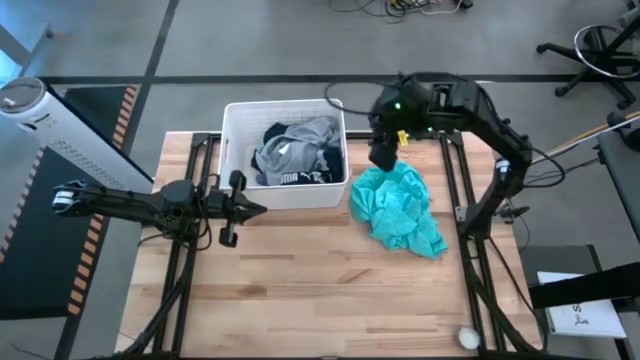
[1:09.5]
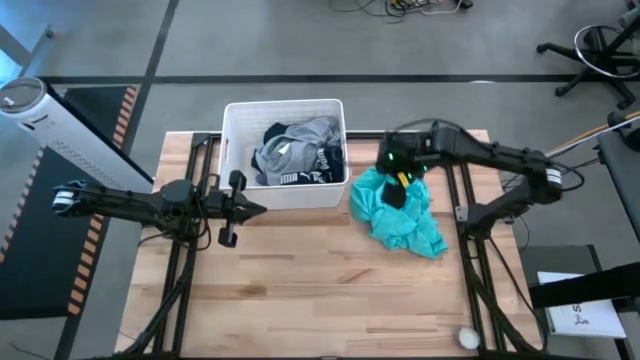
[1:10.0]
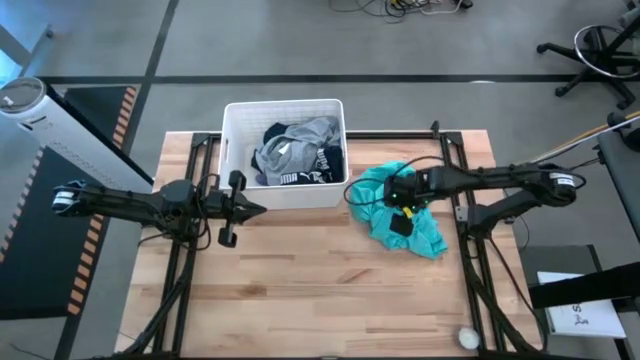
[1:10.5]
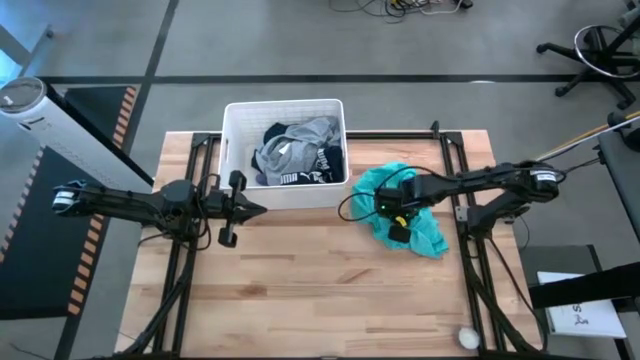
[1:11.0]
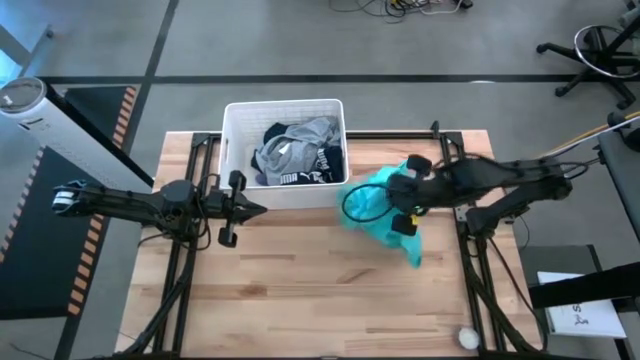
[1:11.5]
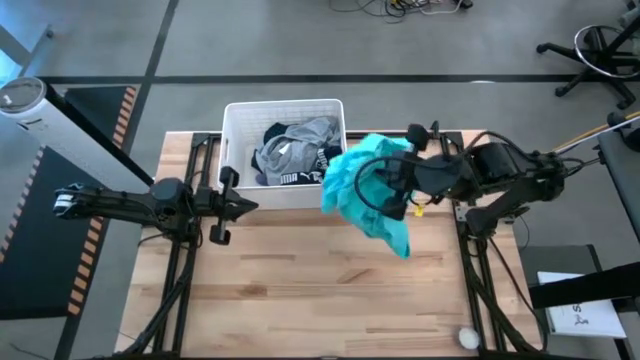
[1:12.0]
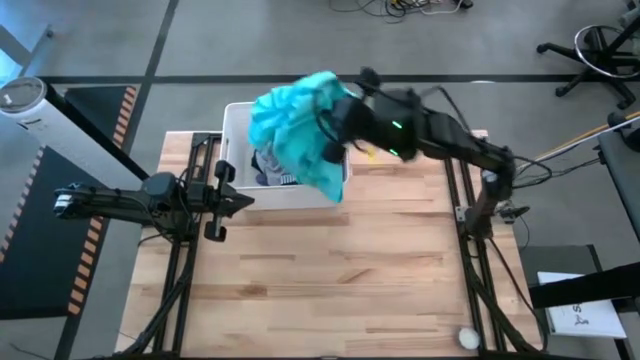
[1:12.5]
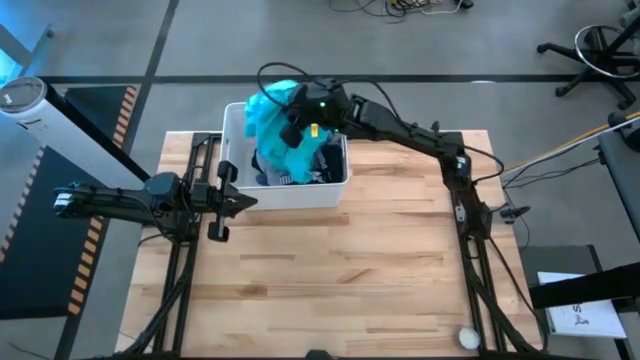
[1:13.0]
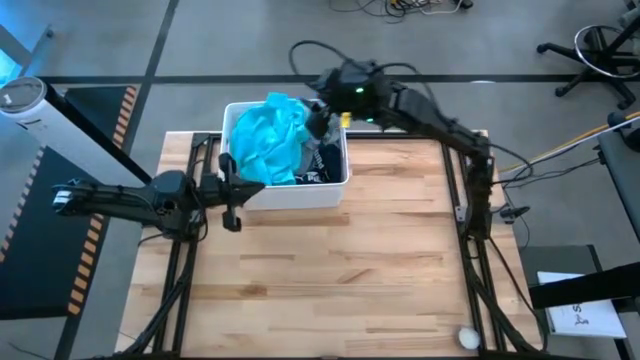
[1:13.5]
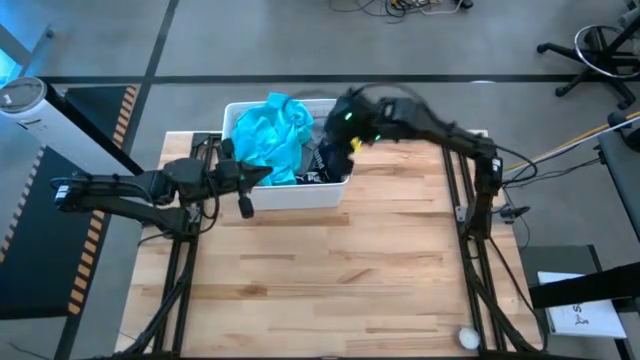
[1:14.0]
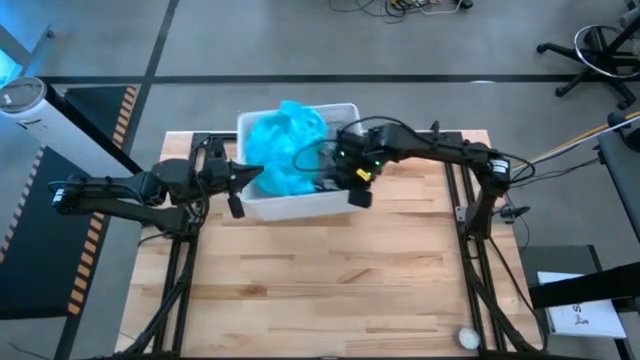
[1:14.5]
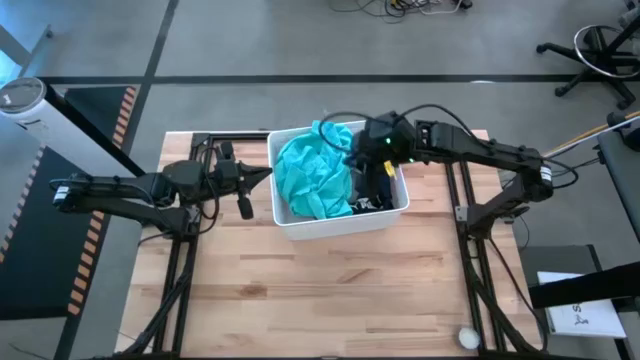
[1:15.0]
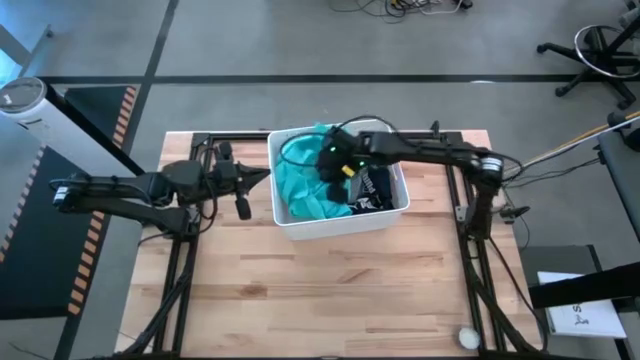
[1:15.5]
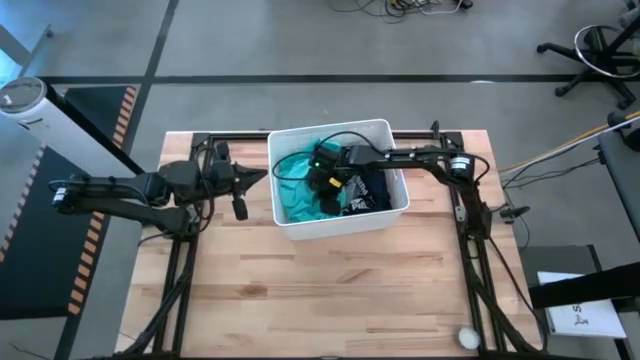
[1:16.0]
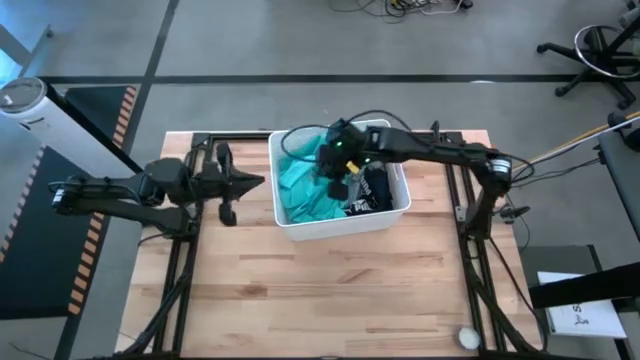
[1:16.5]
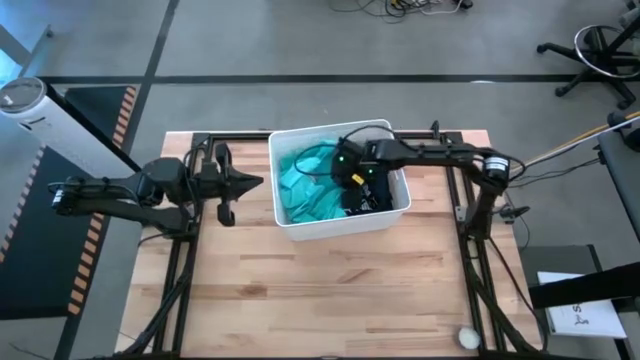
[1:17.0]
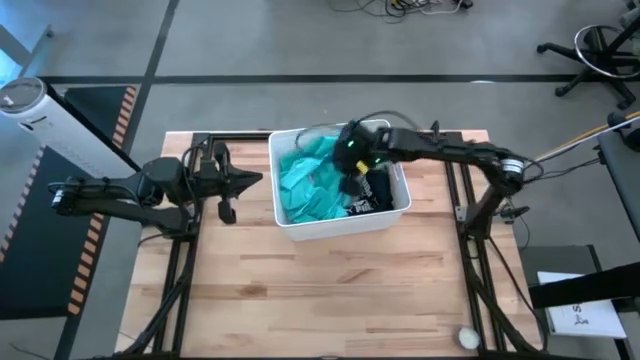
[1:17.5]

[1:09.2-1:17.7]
Task: Sort clothes
Put the light blue polo shirt into the white laundry bin

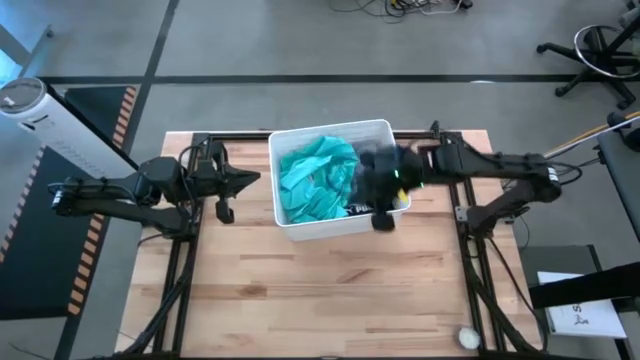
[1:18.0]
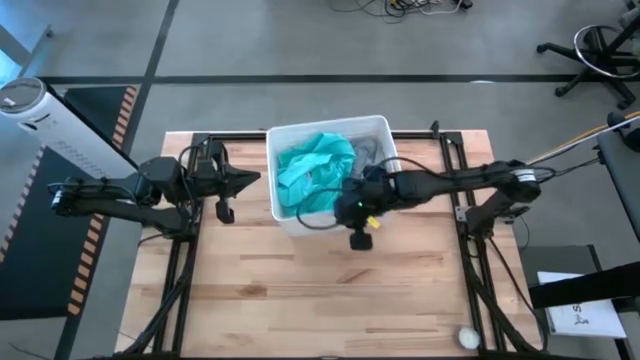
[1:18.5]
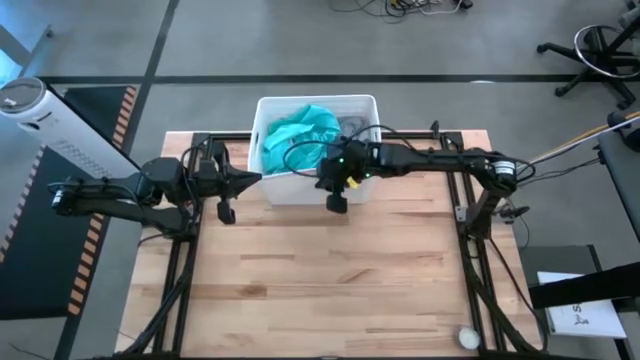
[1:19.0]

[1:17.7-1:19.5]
Adjust the white laundry bin to the top center of the table

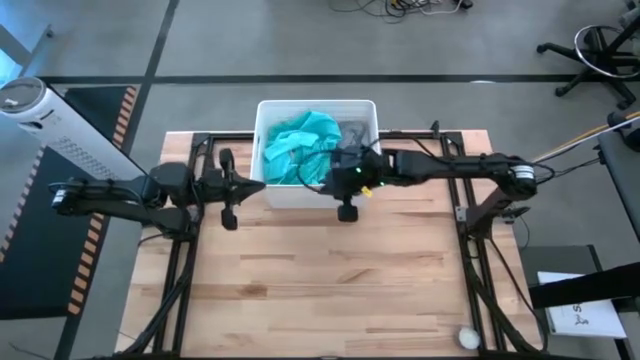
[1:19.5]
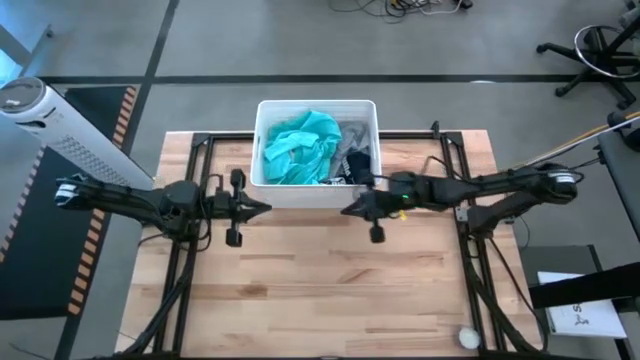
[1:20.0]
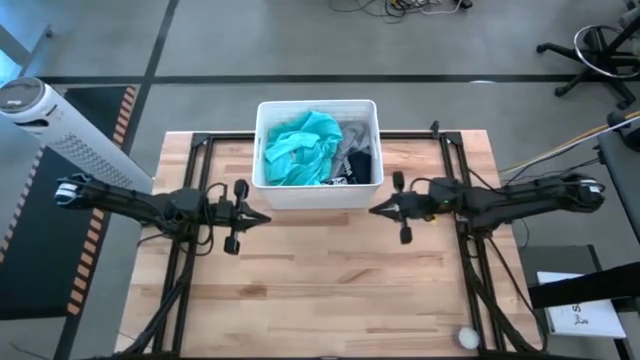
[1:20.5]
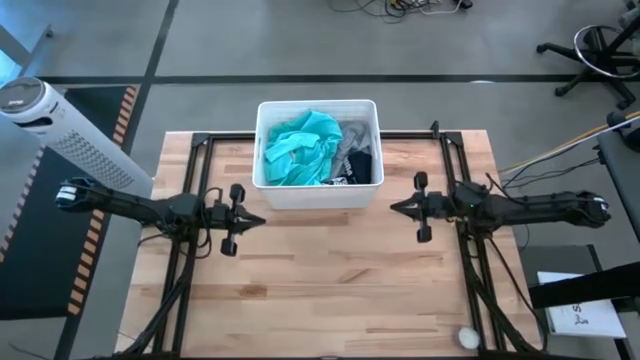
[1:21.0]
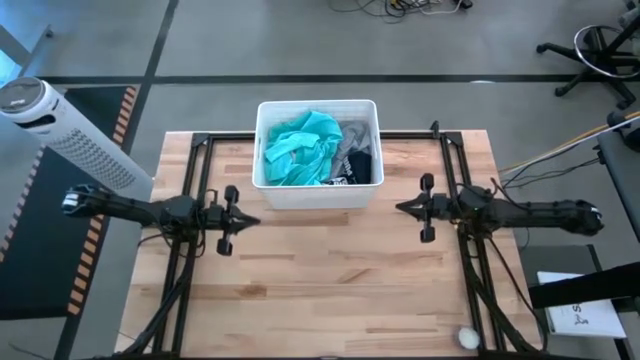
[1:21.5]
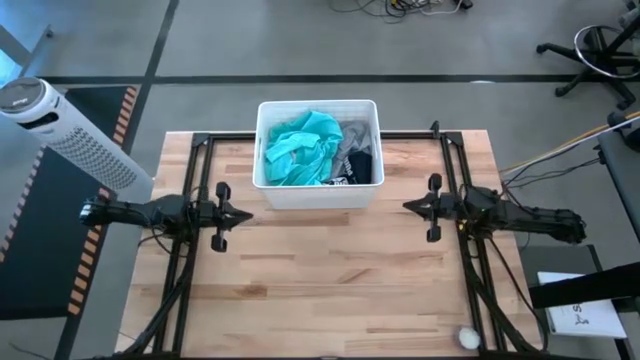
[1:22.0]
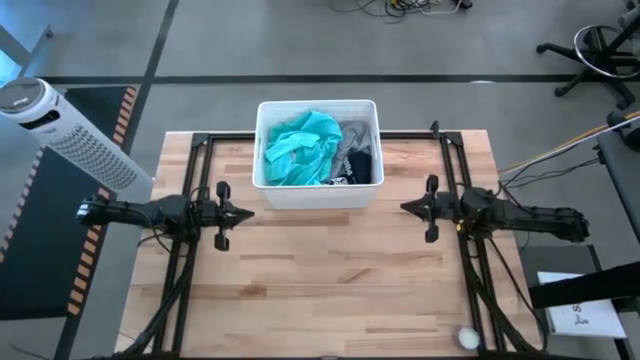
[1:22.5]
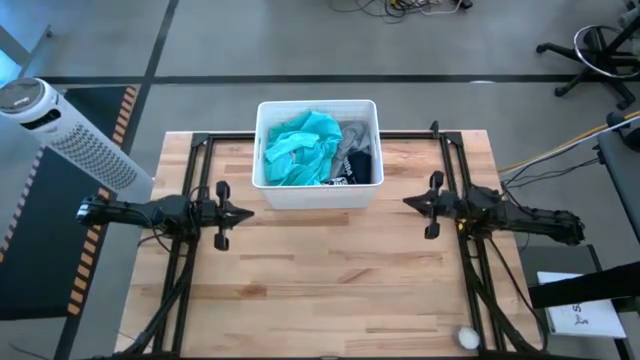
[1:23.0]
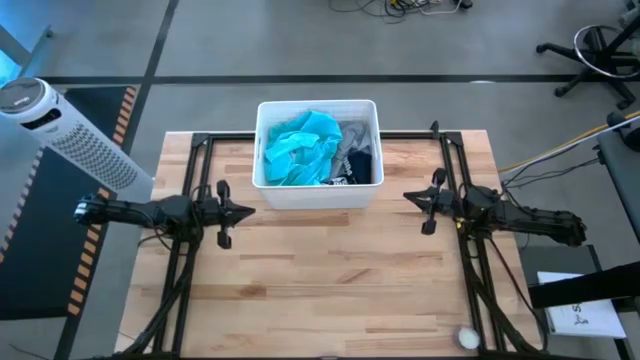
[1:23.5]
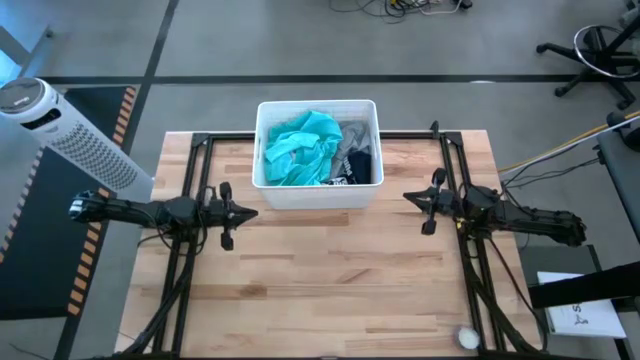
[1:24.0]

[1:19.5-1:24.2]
Return to Home Position

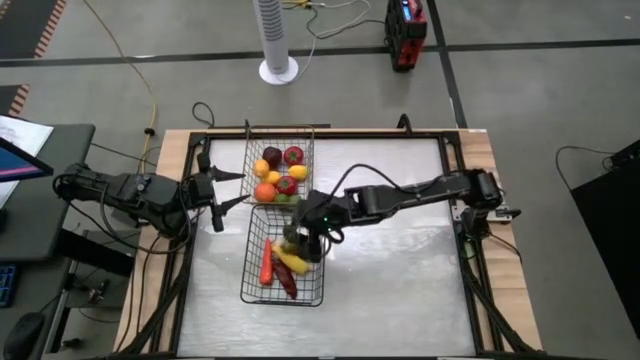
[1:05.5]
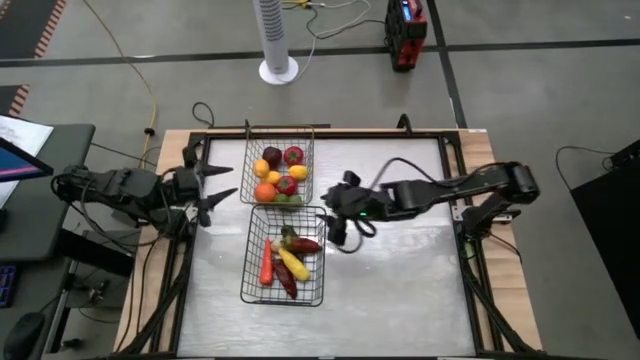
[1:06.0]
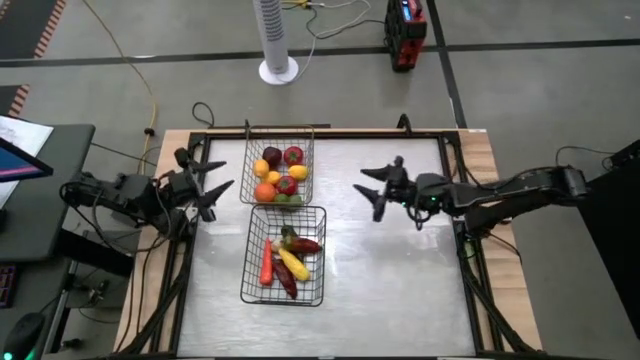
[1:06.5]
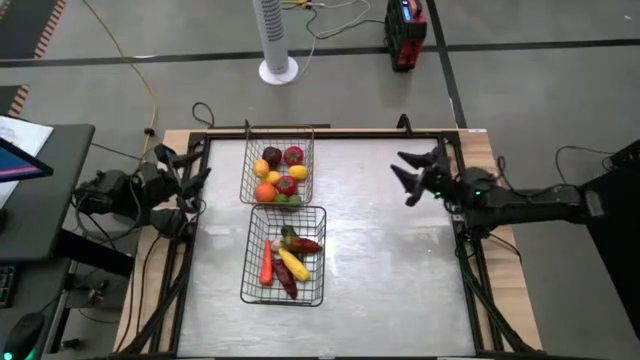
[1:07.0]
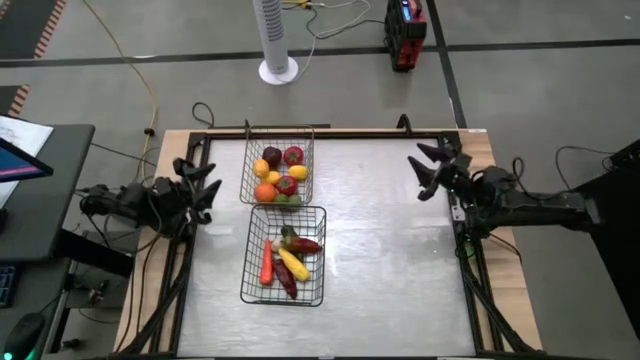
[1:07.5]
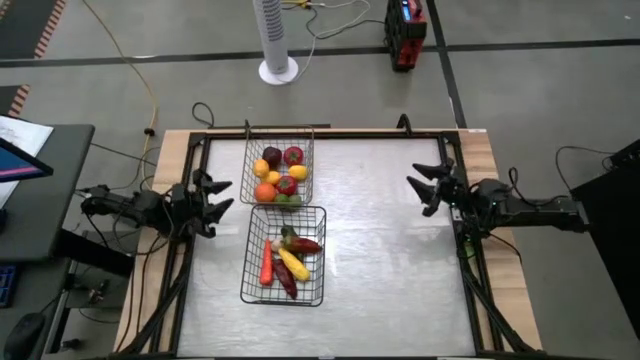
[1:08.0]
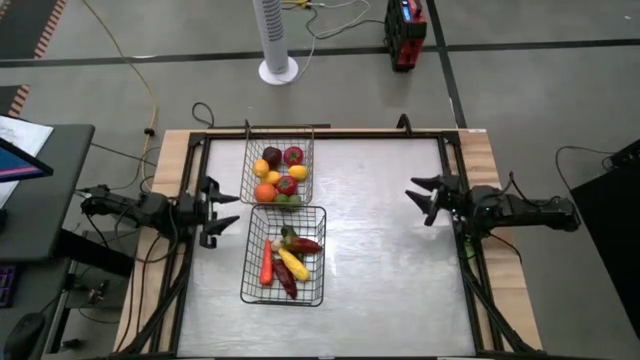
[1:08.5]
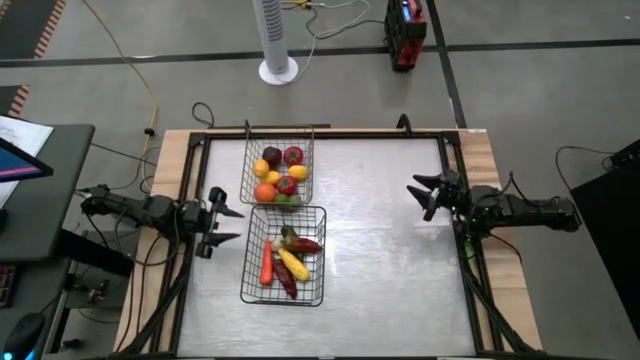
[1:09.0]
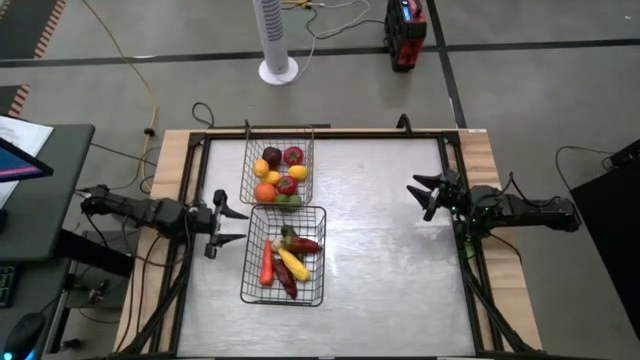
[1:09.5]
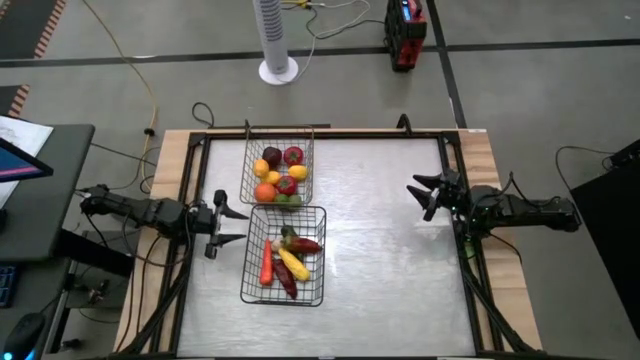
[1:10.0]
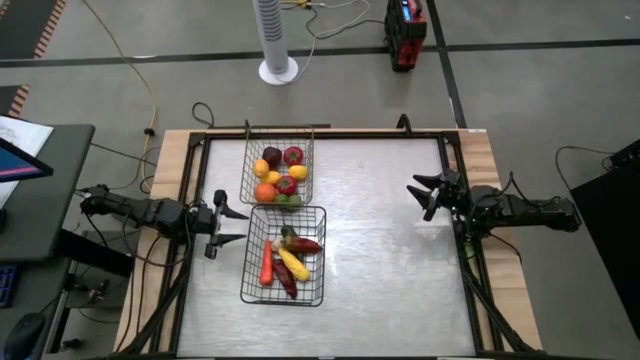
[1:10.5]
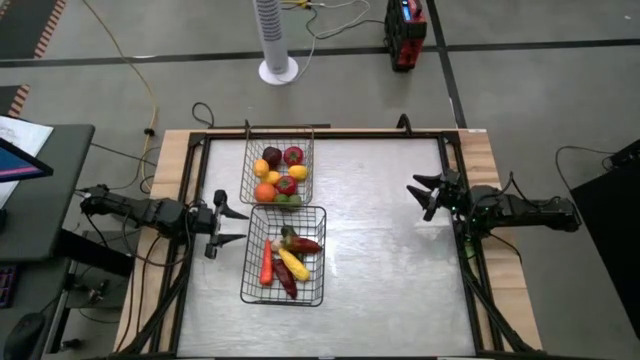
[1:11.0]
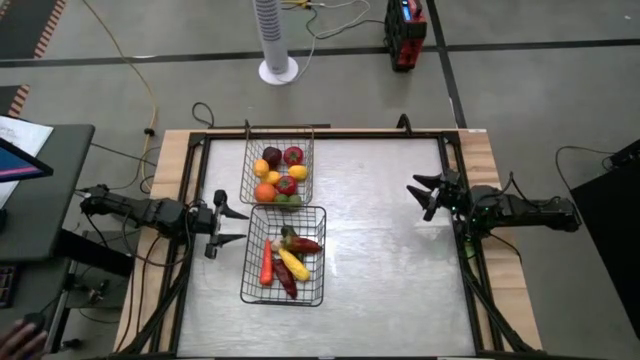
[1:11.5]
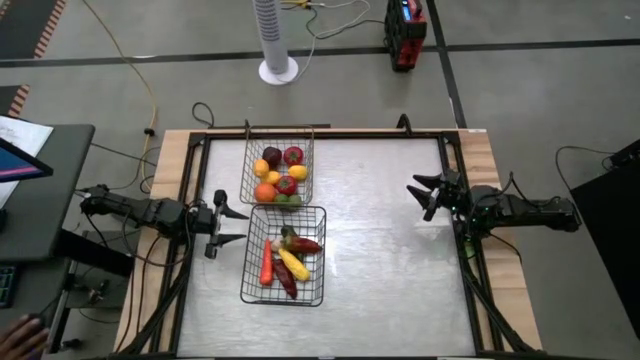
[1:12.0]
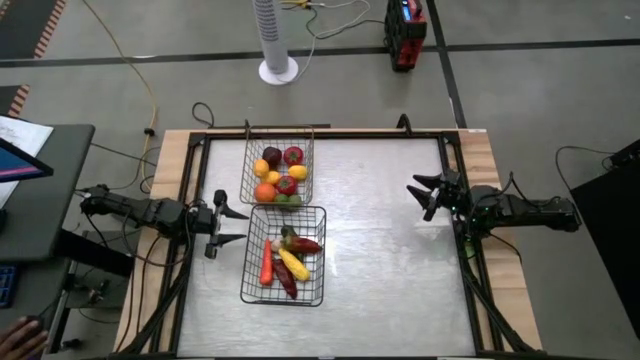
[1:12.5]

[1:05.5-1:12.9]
Task: Sort produce into baskets
Return to Home Position
